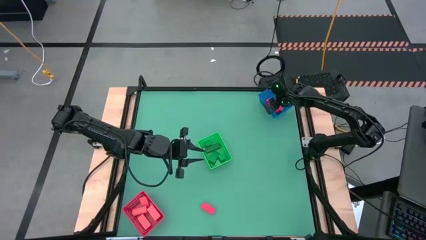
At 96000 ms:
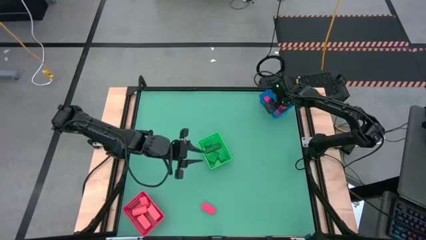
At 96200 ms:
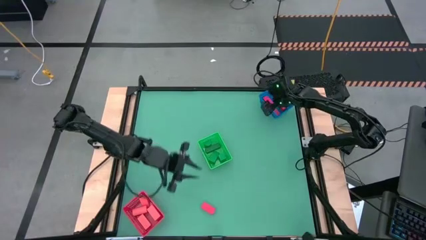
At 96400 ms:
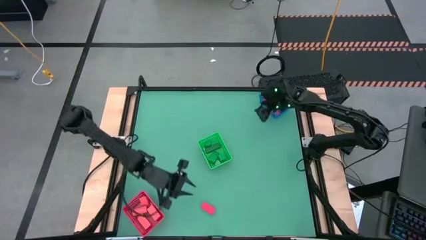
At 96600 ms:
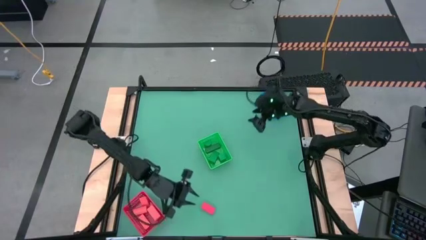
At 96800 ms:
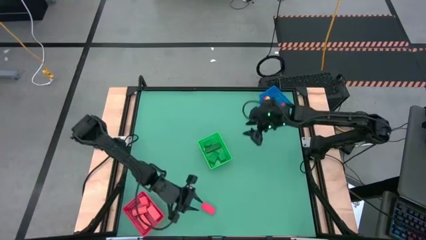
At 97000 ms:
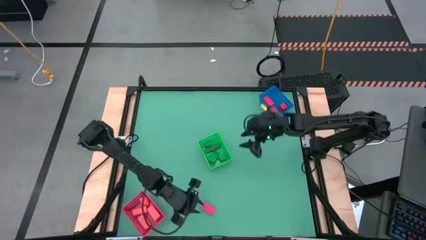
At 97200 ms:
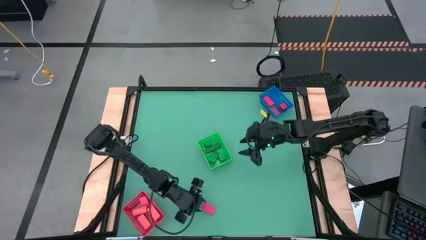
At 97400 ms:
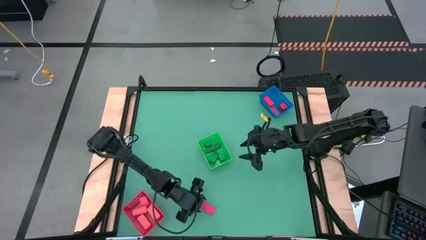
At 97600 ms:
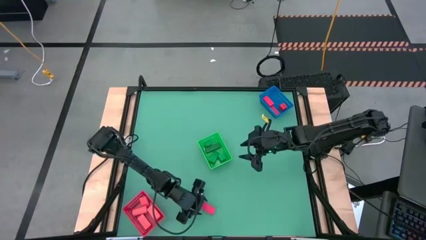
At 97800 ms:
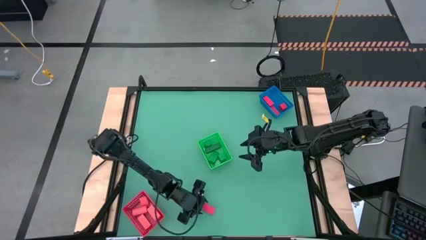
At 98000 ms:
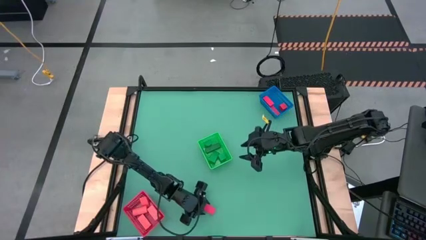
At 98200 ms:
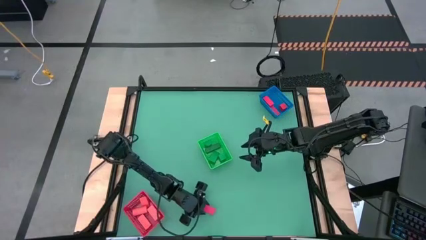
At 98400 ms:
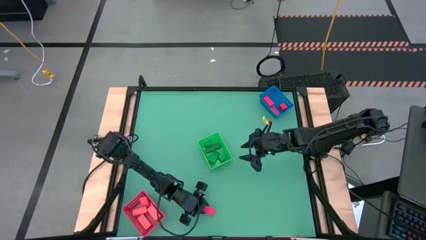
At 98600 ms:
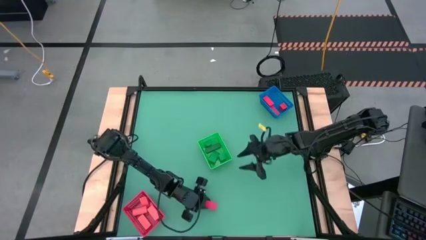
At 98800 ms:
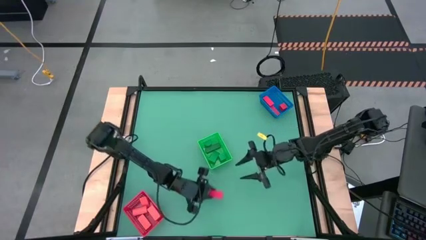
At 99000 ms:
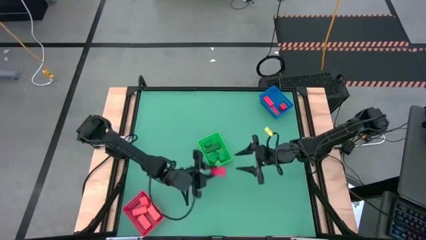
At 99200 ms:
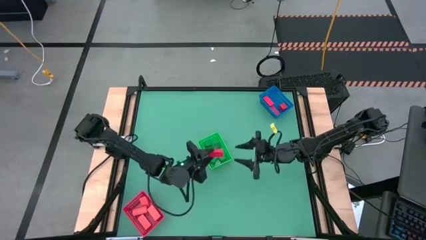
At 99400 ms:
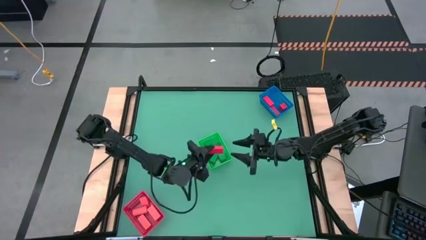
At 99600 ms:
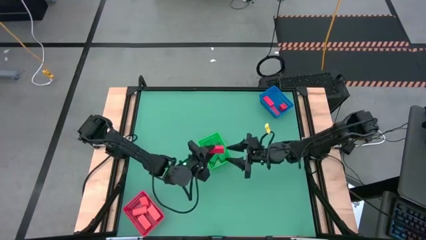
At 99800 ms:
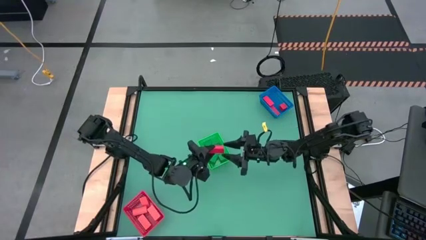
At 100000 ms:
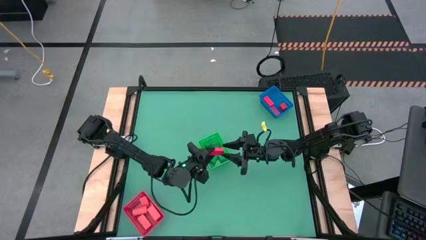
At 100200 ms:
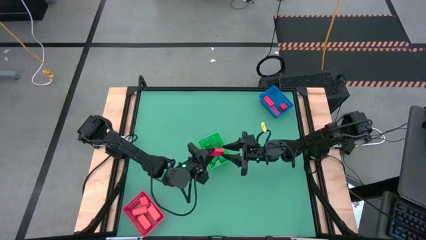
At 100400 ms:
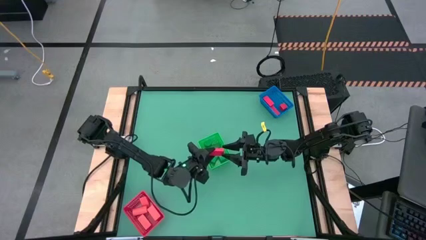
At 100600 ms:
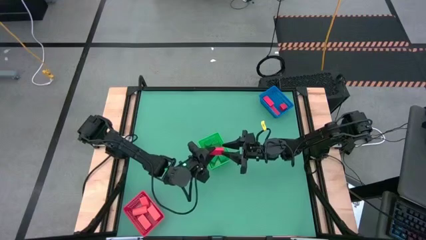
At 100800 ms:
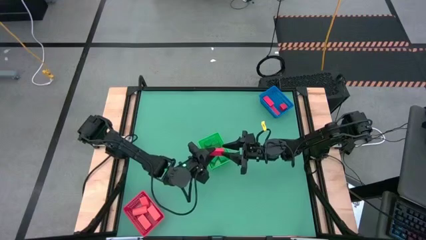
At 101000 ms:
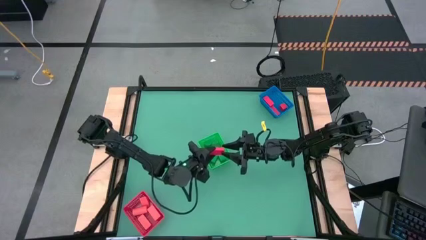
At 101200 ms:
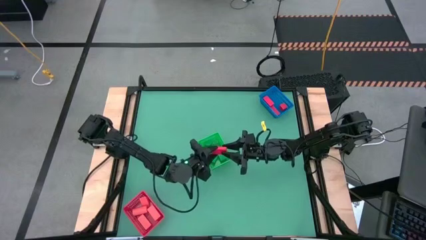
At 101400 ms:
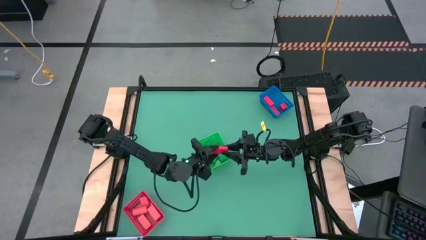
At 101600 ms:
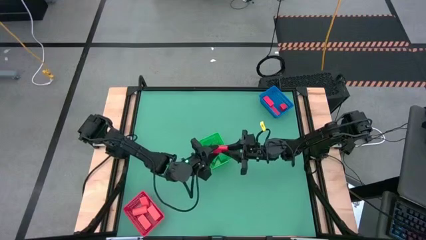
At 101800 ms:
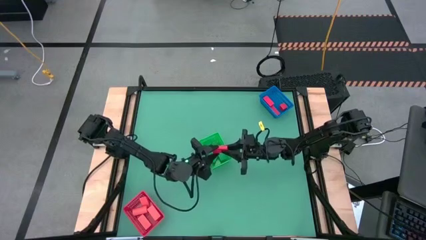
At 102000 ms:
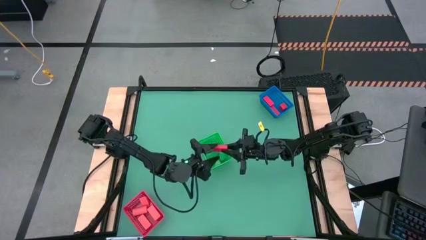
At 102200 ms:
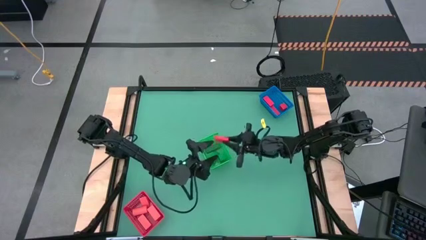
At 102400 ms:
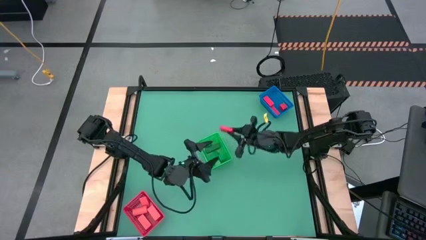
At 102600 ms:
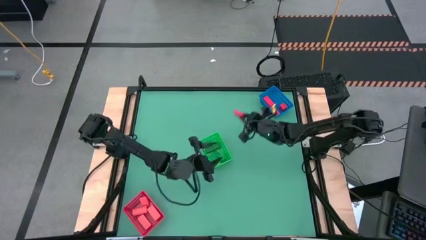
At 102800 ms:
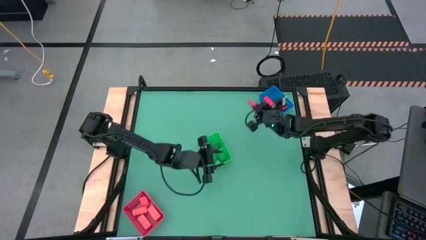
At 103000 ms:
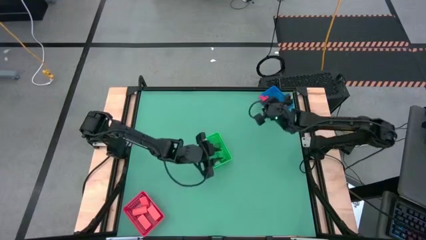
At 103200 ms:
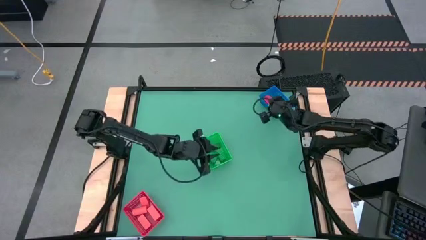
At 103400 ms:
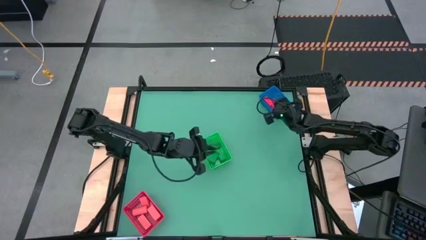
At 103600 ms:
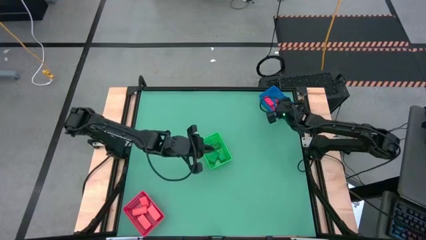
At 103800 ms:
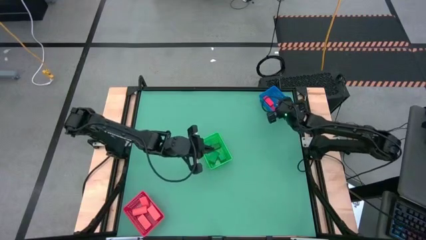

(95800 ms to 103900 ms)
Task: Sort & place blocks by color
Put the light pink block into the blue bin

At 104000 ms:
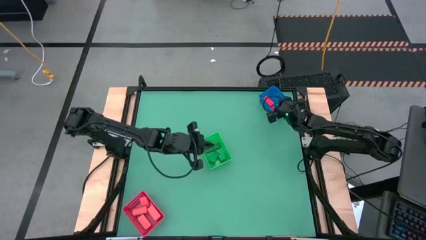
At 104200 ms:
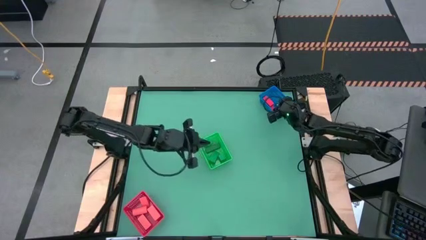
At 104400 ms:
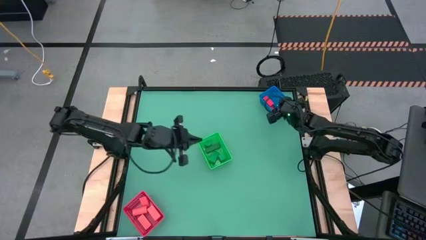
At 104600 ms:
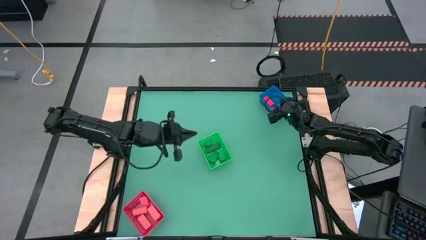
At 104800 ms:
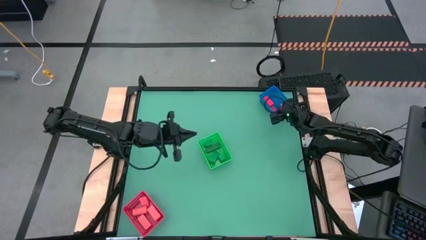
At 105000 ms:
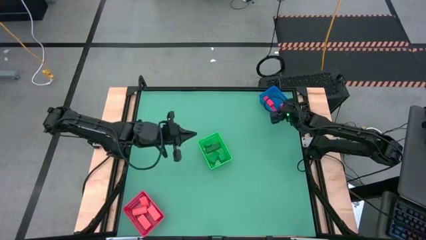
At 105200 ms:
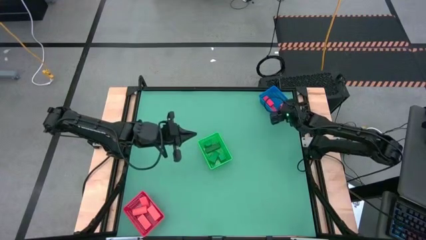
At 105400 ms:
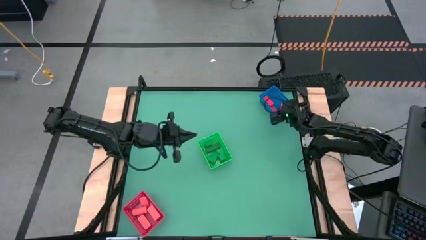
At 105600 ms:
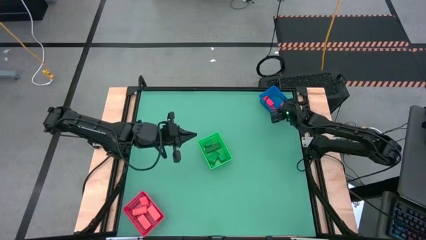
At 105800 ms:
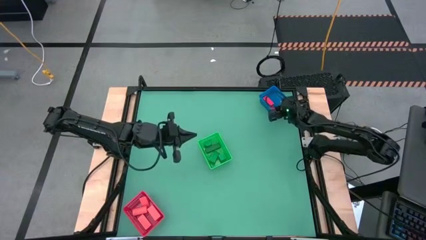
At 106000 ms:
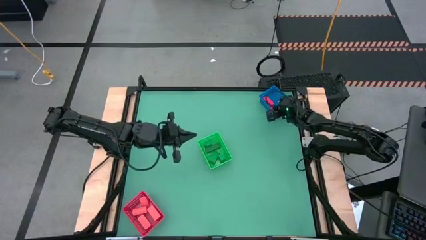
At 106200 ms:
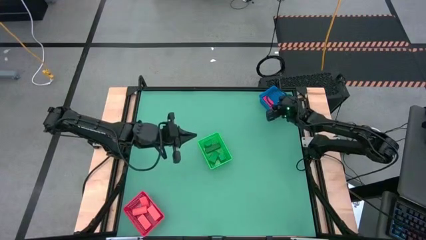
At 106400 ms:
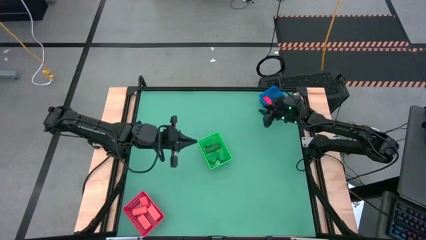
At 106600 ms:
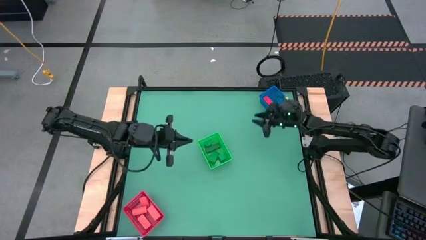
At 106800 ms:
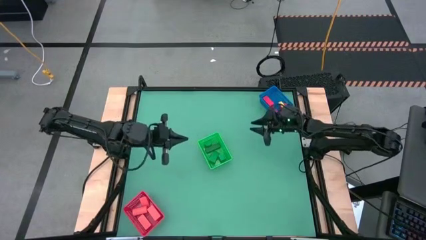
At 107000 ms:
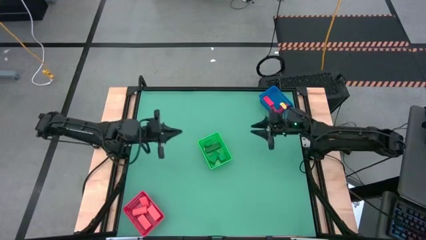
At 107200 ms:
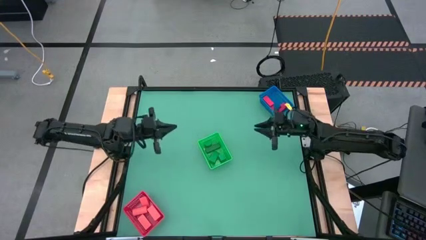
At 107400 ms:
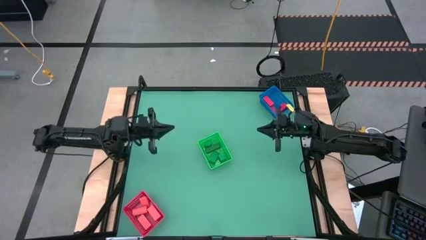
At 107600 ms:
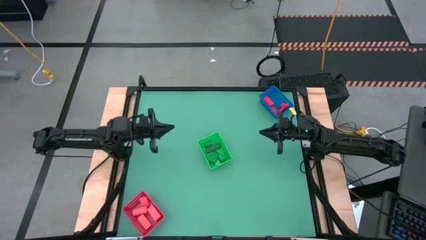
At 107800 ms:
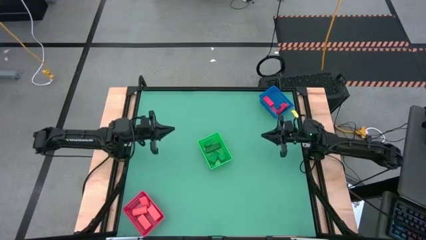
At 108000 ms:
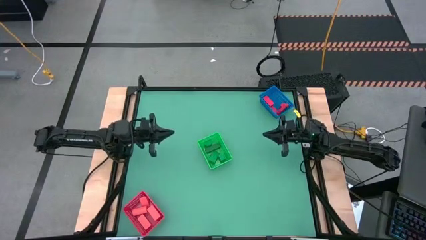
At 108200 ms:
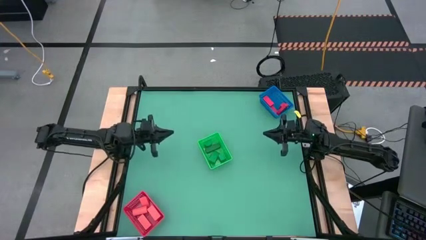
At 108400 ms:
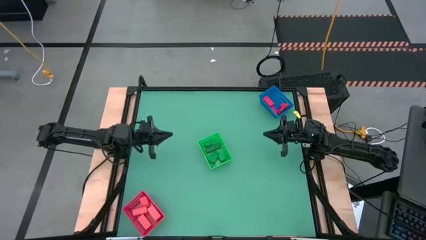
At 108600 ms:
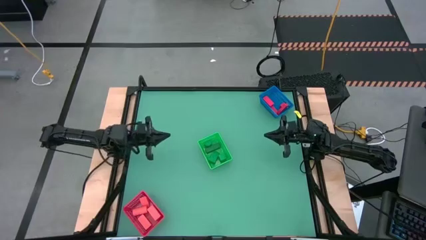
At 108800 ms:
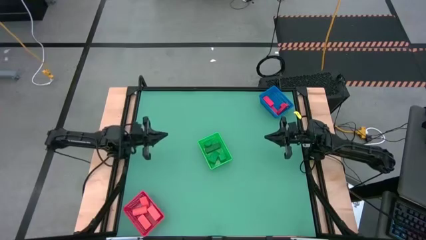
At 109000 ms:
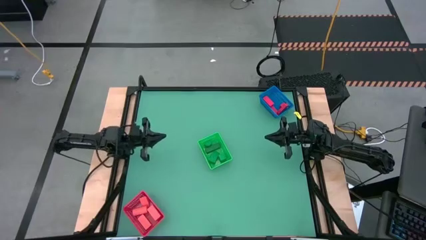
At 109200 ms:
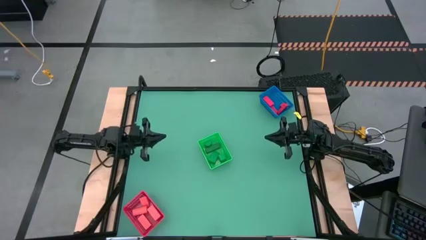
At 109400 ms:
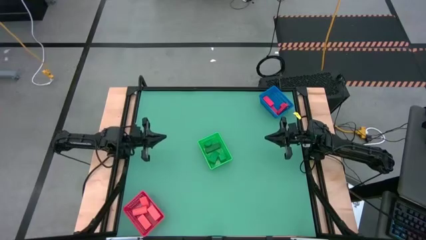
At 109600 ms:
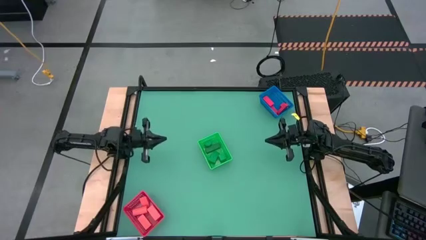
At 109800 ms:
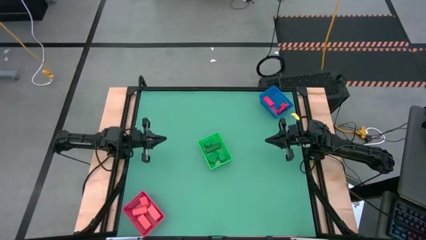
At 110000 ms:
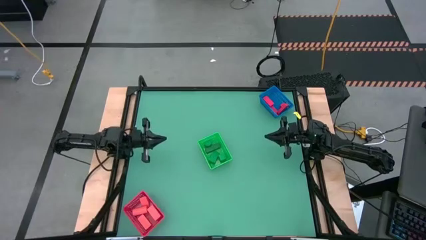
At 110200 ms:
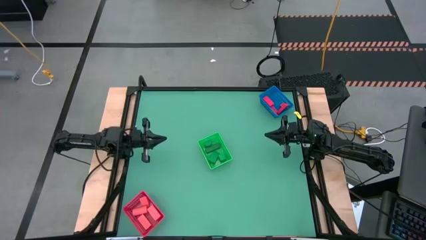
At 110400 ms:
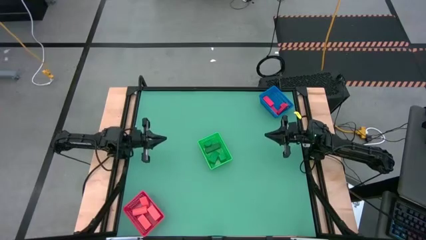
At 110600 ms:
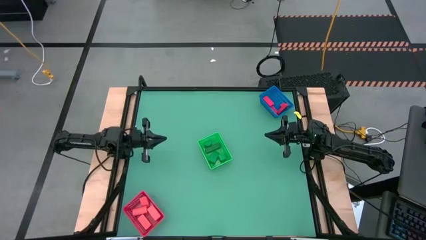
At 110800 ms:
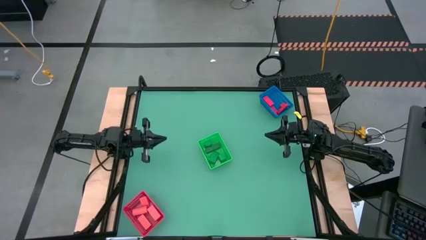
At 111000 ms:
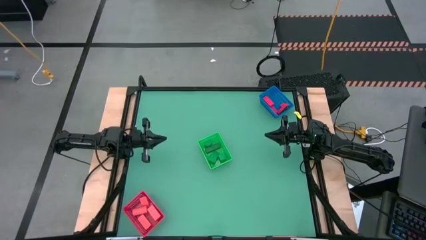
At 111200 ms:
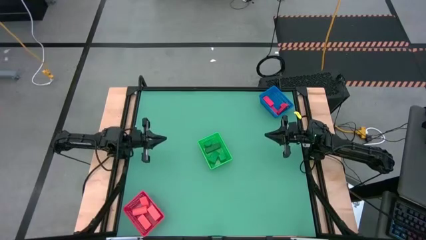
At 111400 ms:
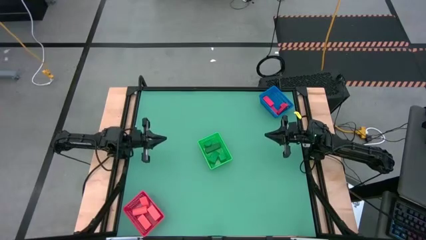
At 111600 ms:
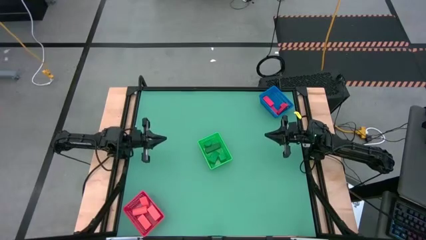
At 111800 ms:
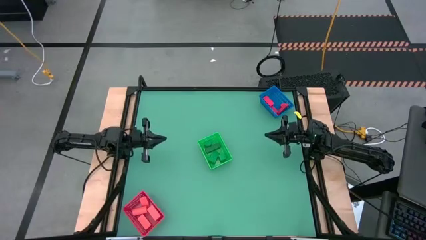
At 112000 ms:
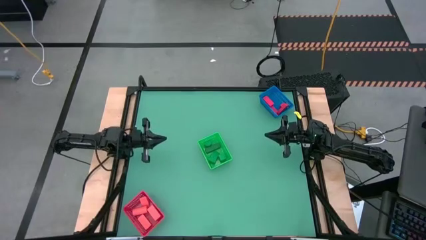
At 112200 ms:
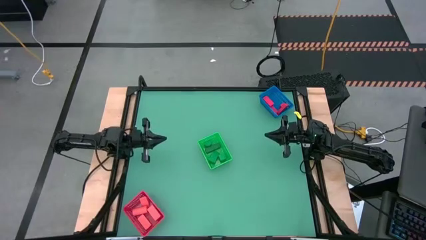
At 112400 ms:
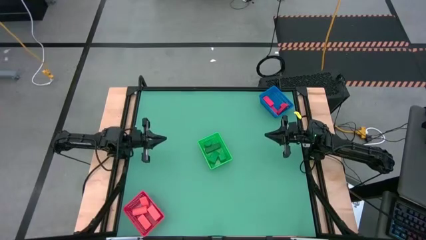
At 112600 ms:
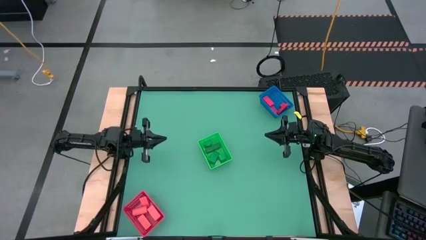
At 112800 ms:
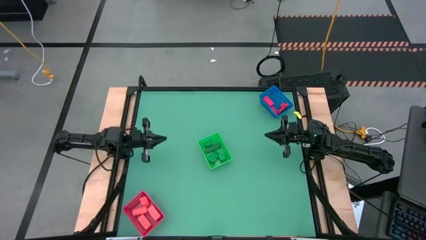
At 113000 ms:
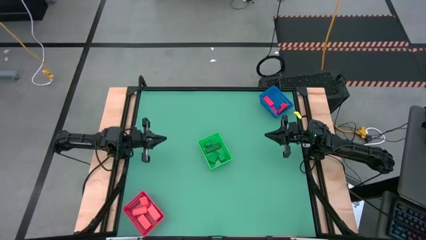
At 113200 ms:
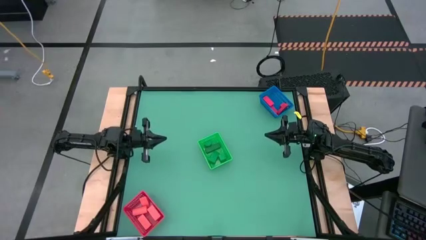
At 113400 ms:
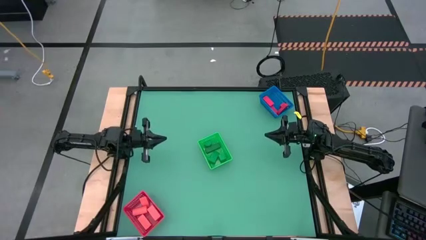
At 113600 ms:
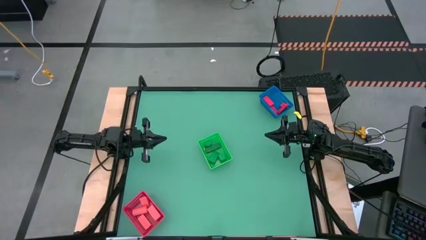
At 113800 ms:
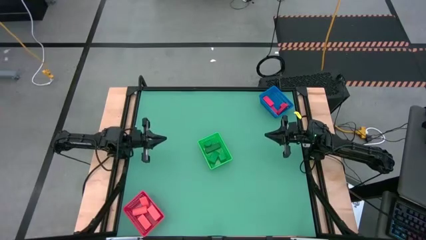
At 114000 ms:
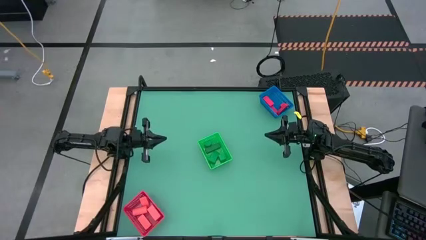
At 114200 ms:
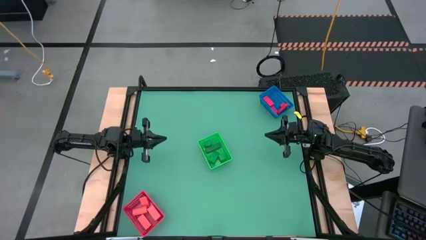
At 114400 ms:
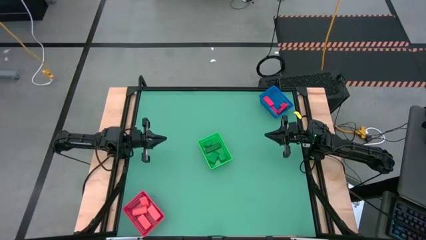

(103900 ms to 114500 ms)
Return to Home Position
